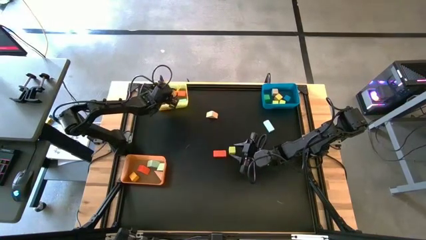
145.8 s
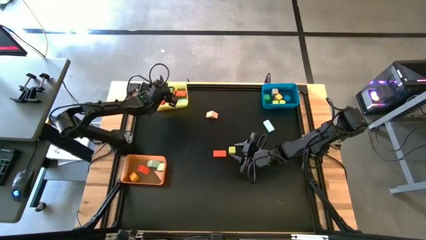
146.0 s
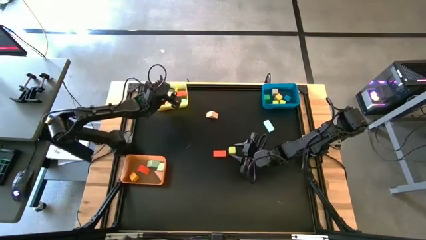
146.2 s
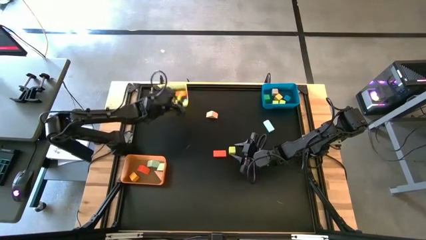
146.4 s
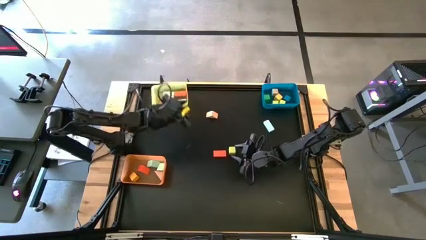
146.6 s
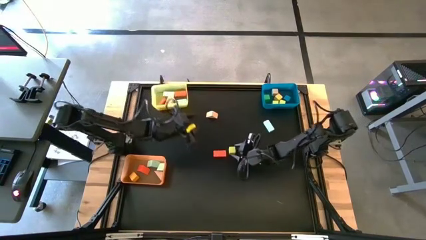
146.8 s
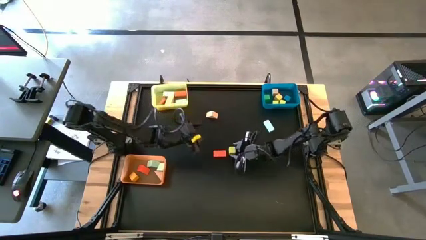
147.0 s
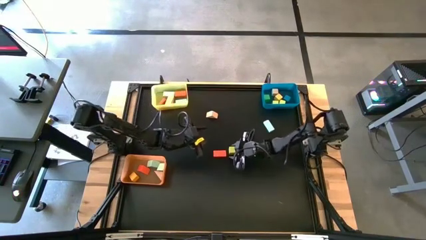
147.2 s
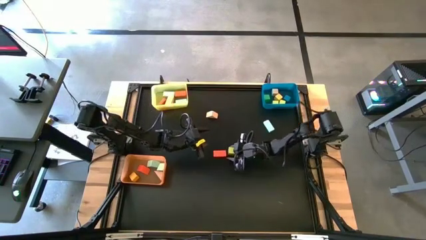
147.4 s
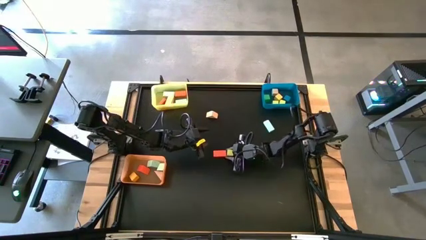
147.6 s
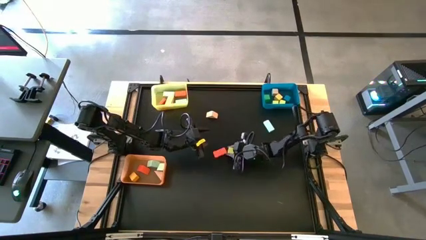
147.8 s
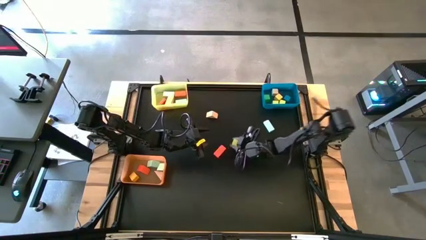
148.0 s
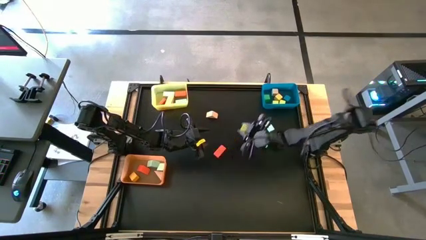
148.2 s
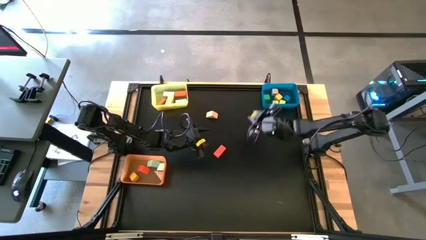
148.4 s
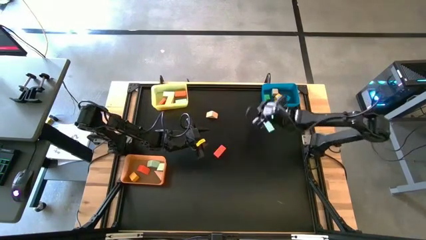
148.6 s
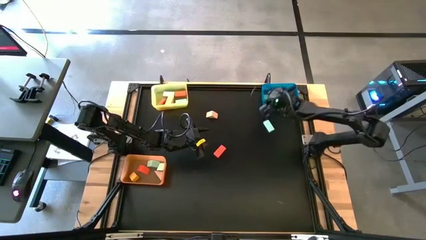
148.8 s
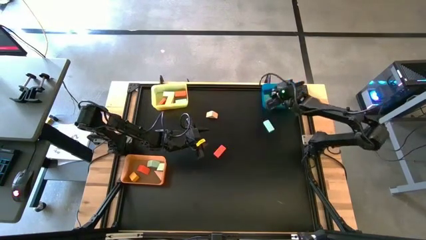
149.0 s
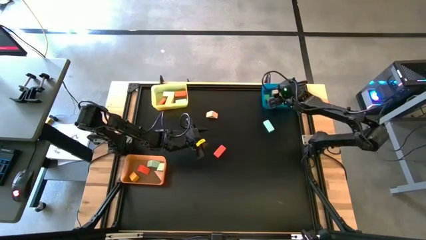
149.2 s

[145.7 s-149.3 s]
Task: Sort blocks by size
Put the yellow wooden block into the blue bin

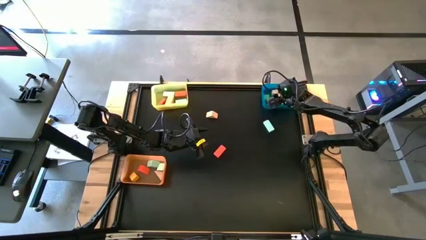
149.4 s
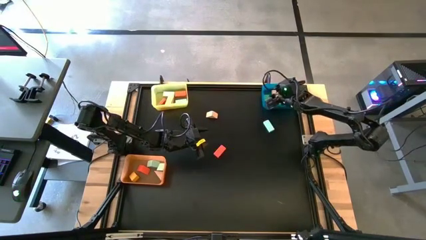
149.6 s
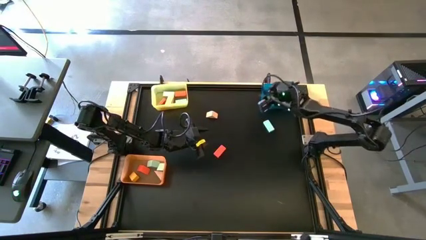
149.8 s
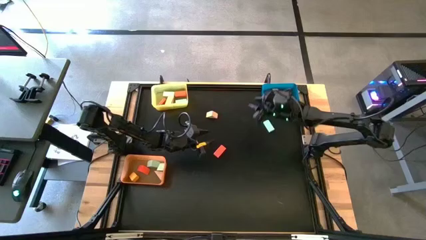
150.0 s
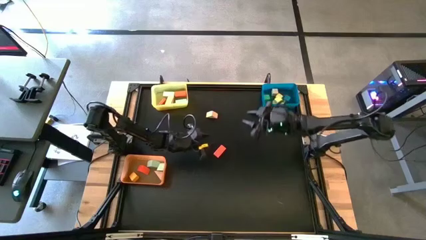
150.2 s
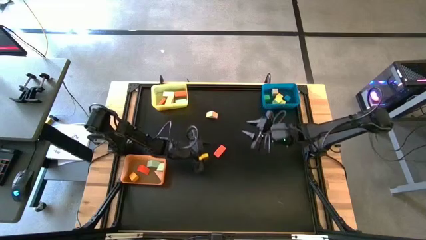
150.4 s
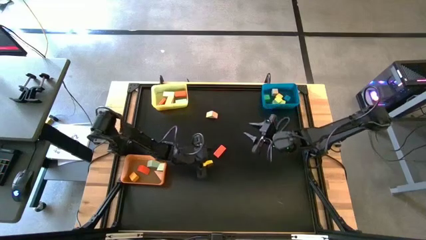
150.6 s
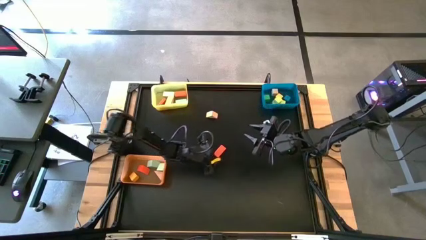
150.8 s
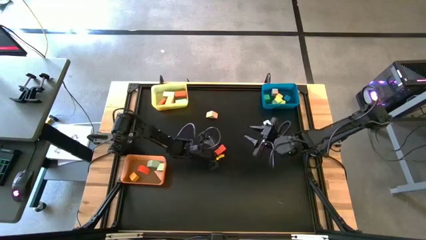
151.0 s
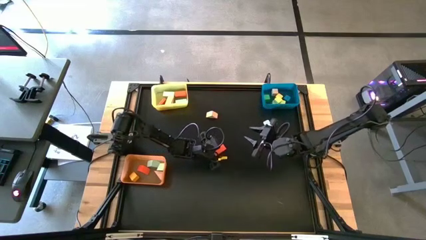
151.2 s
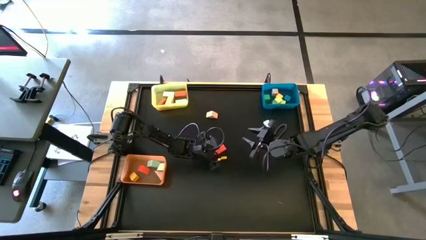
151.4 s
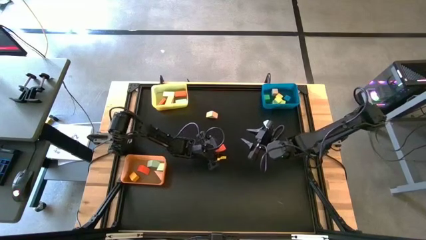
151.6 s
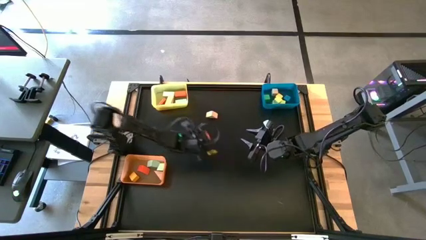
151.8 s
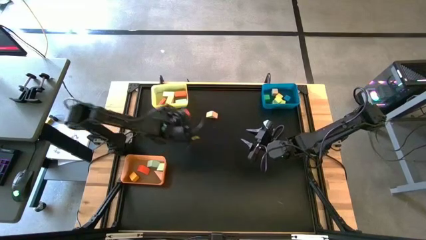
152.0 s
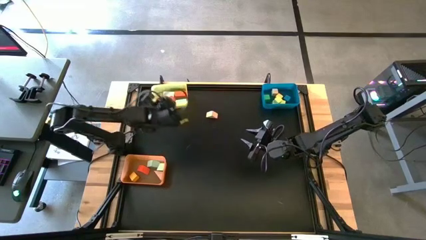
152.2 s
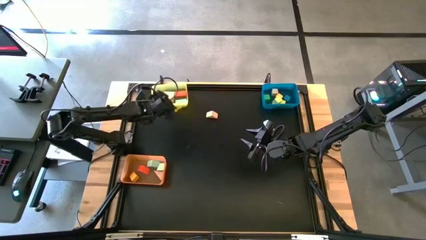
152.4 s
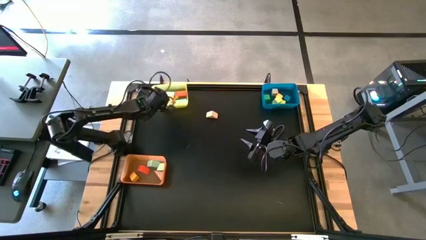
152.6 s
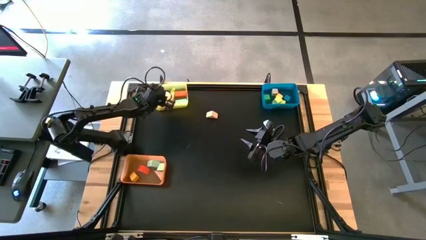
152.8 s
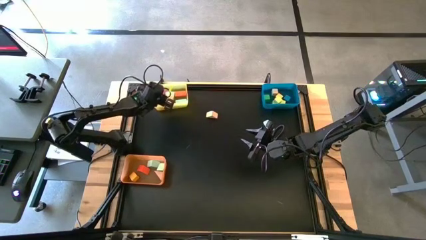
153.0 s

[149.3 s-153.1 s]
Put the orange wooden block into the yellow bin

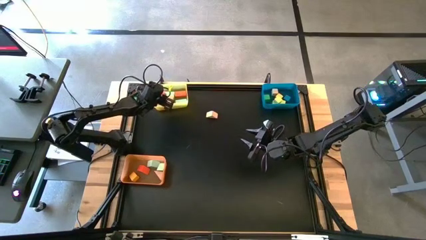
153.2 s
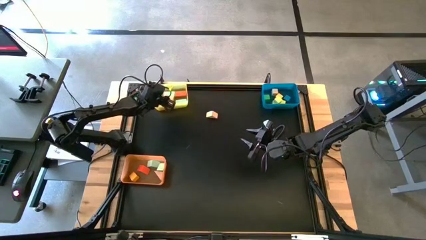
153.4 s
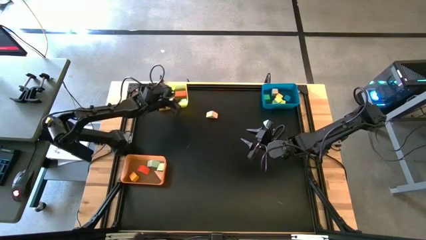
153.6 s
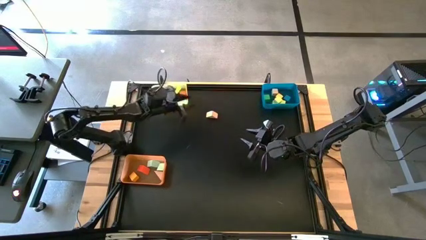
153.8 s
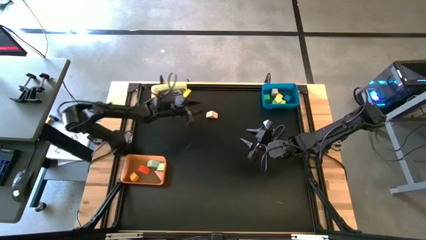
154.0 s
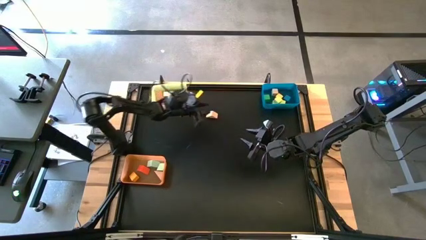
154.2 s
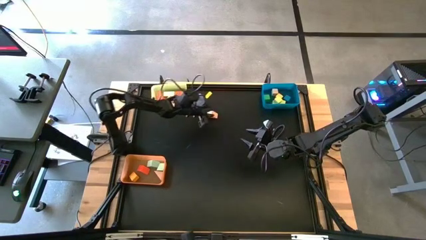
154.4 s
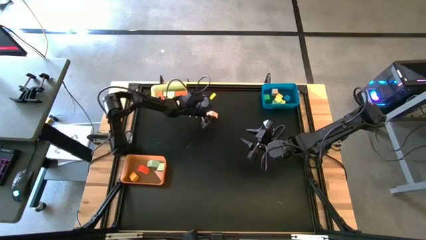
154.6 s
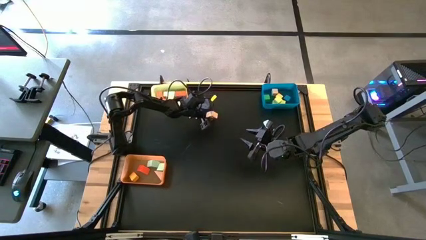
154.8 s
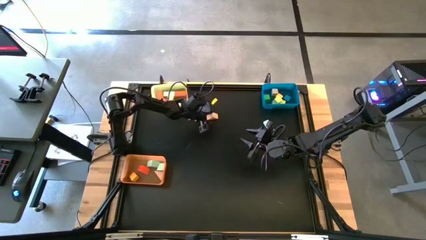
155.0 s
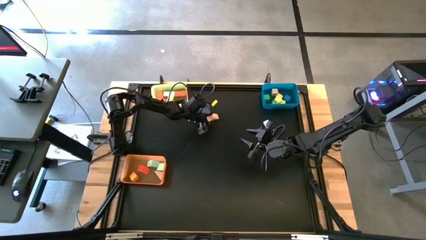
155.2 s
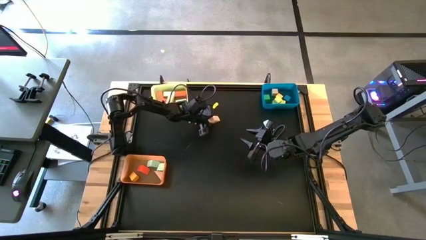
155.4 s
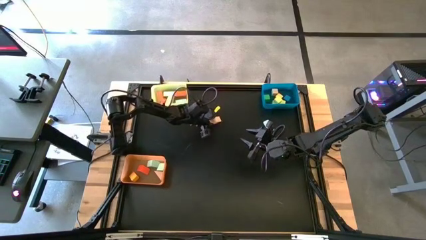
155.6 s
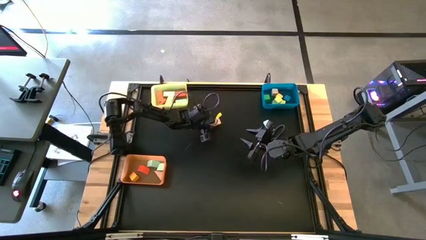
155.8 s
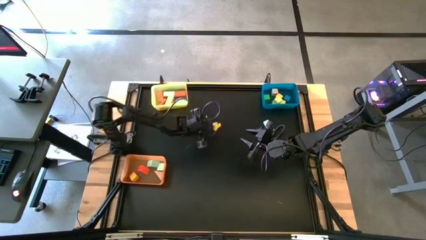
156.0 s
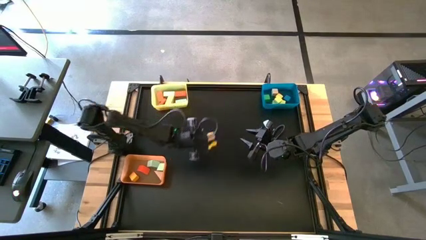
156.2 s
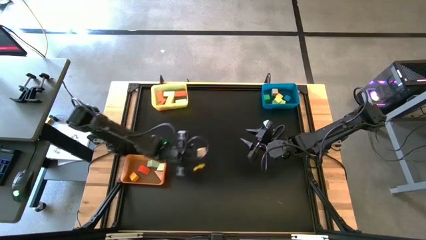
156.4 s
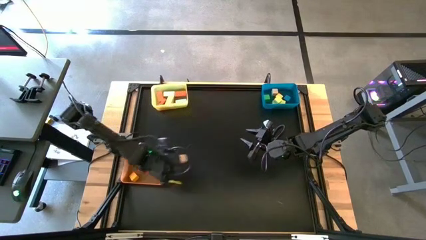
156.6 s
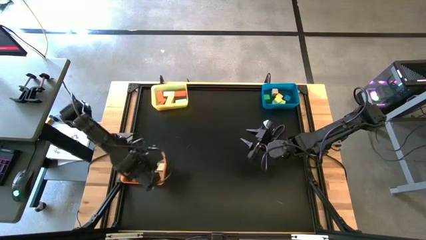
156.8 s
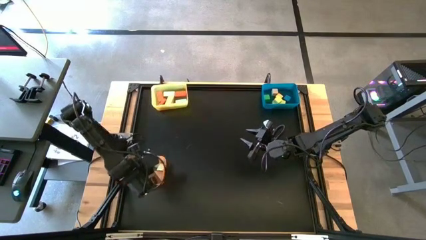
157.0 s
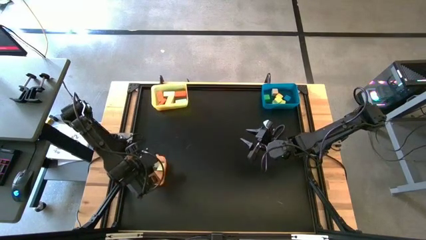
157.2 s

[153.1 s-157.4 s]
Put the brown wooden block into the orange bin

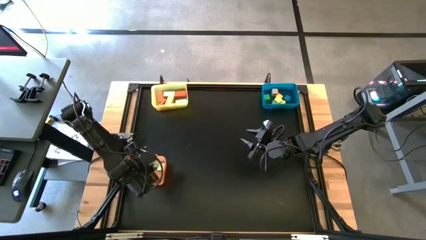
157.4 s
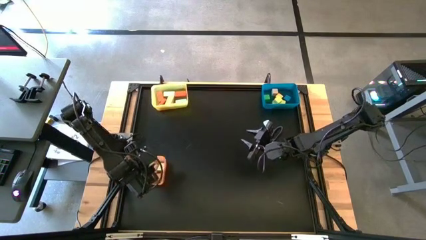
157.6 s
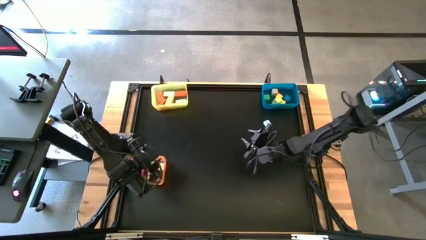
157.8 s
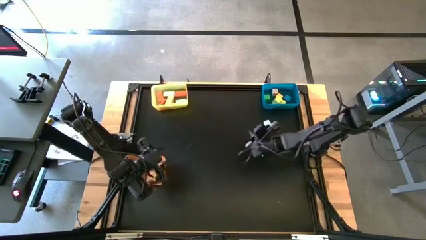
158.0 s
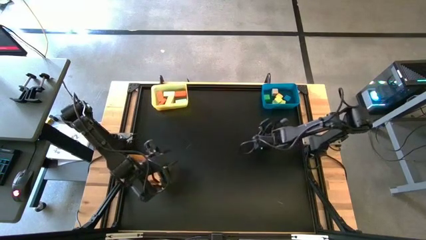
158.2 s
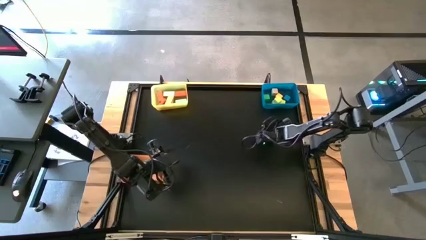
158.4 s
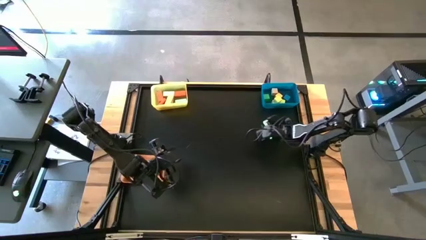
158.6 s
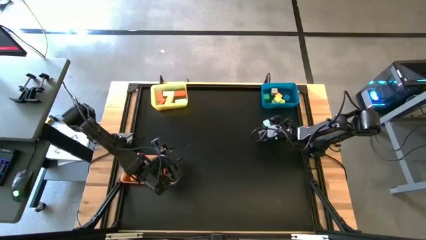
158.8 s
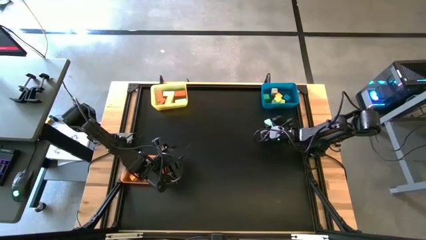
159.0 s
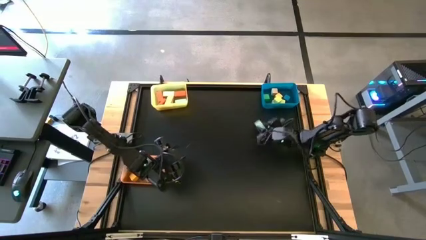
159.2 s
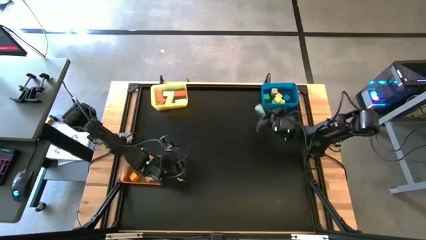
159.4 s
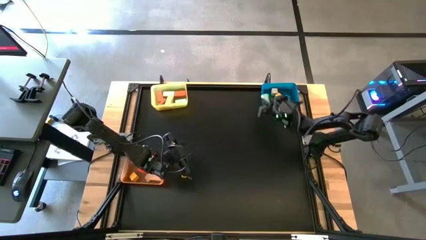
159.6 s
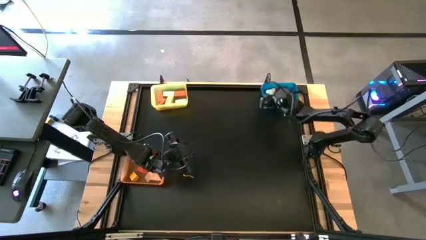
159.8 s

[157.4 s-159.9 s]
Put the light green wooden block into the blue bin
